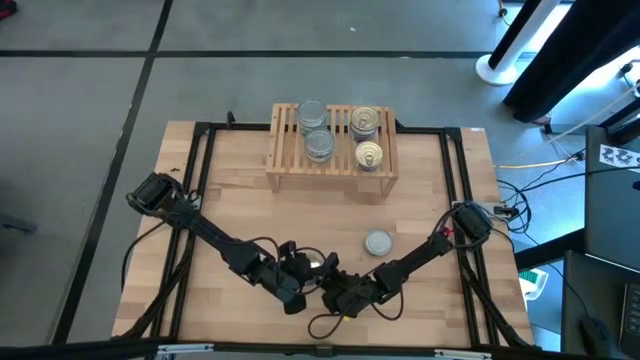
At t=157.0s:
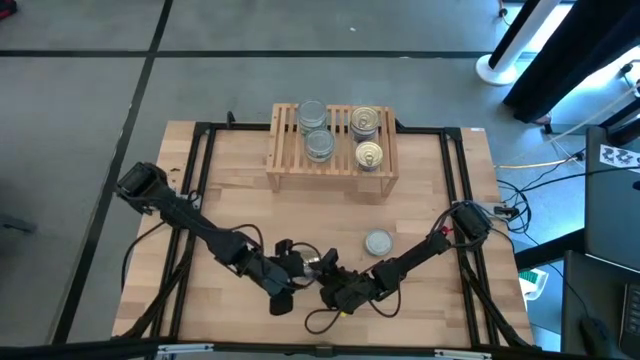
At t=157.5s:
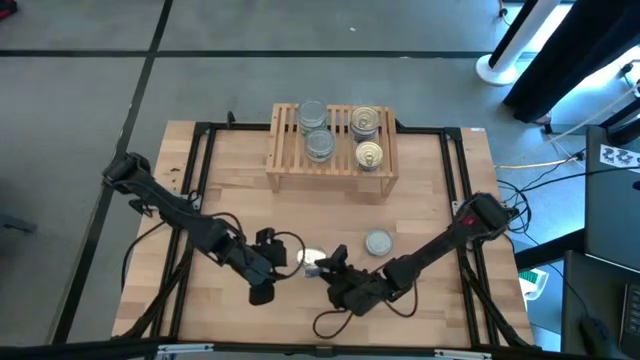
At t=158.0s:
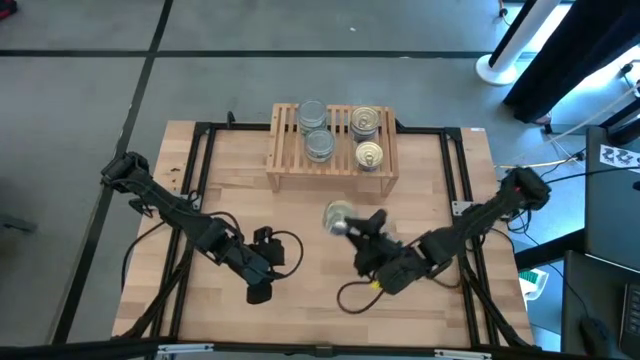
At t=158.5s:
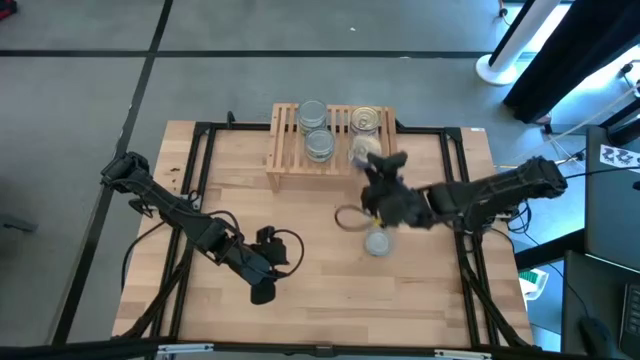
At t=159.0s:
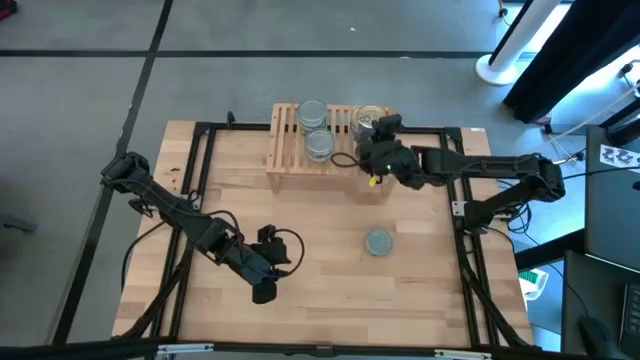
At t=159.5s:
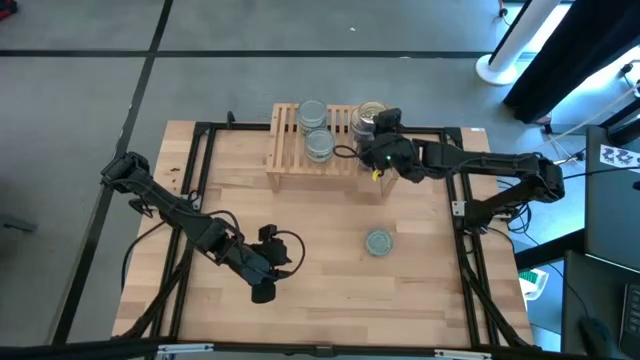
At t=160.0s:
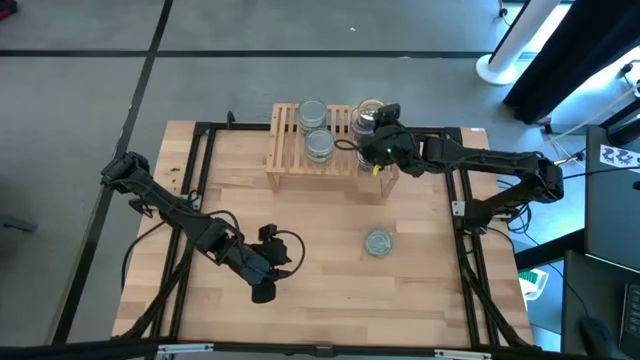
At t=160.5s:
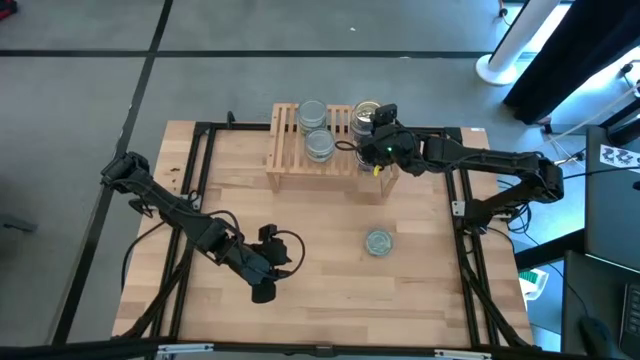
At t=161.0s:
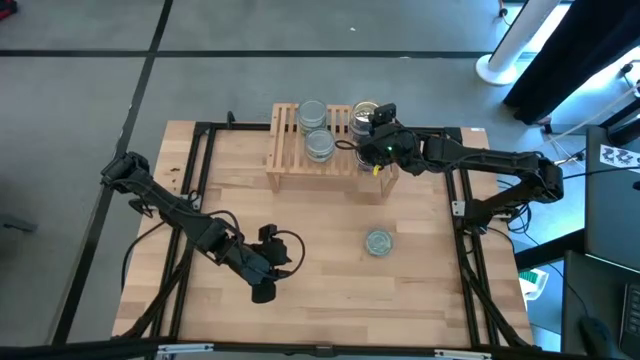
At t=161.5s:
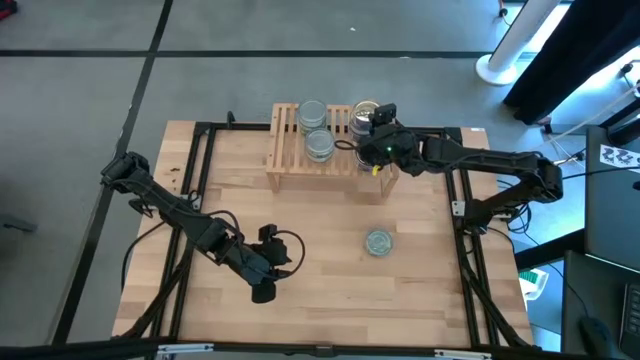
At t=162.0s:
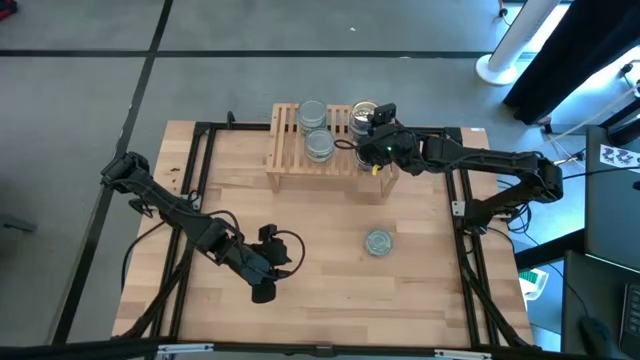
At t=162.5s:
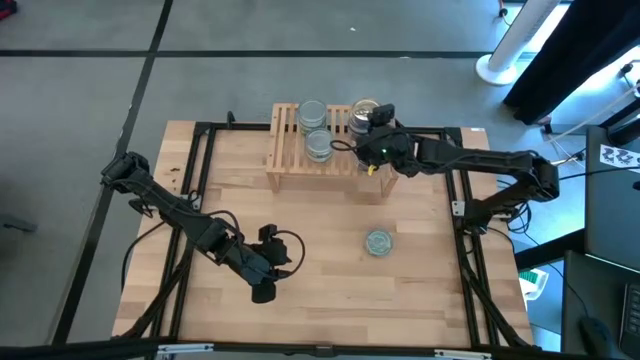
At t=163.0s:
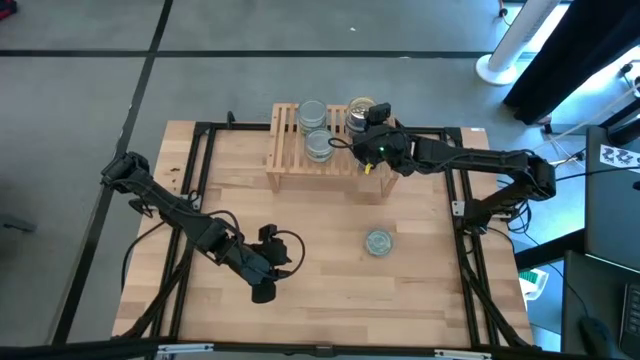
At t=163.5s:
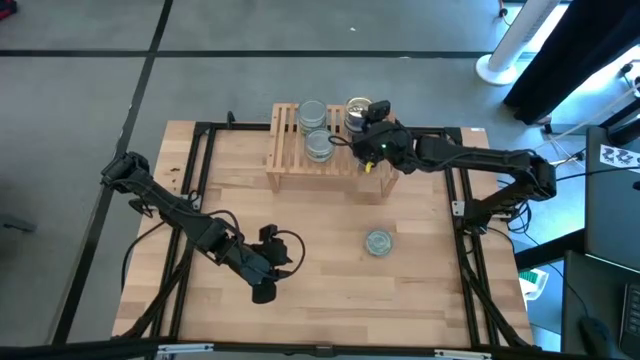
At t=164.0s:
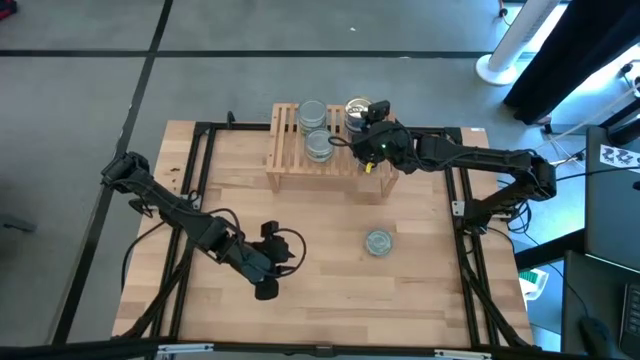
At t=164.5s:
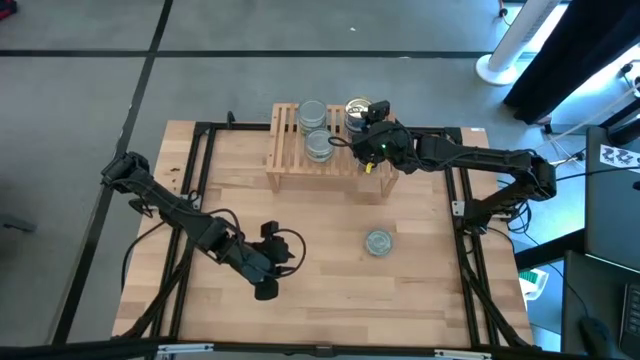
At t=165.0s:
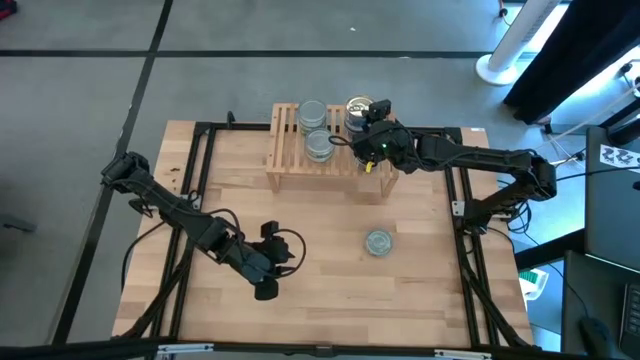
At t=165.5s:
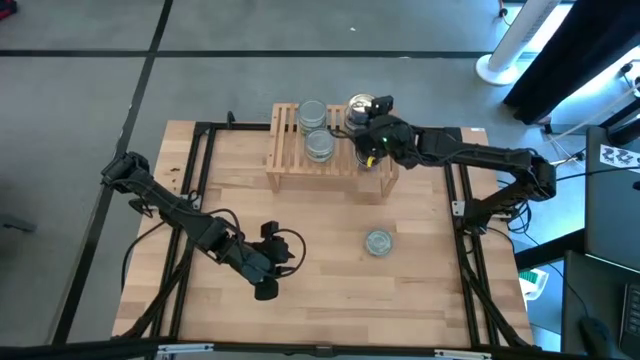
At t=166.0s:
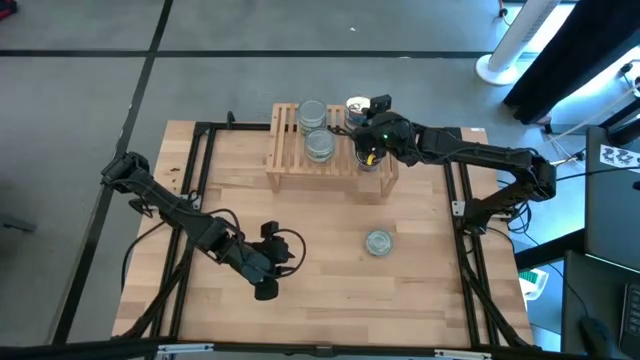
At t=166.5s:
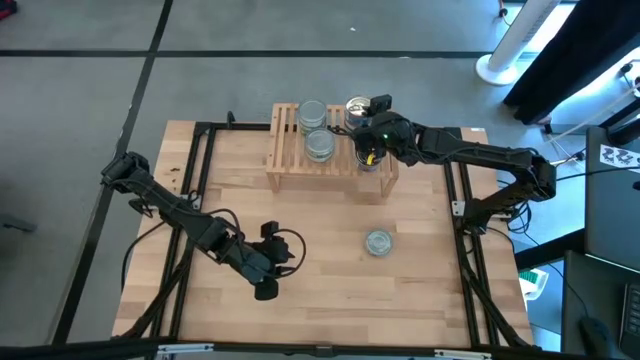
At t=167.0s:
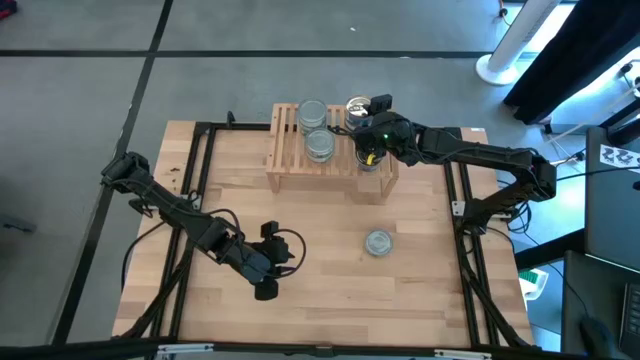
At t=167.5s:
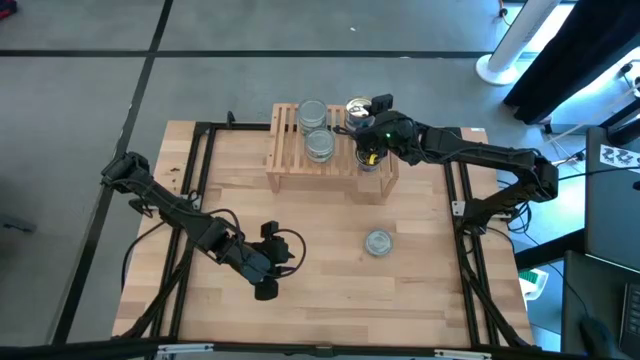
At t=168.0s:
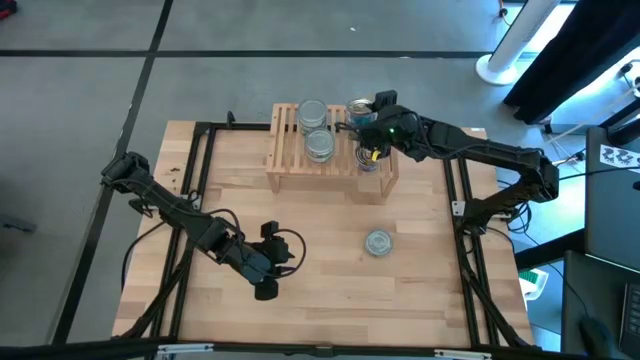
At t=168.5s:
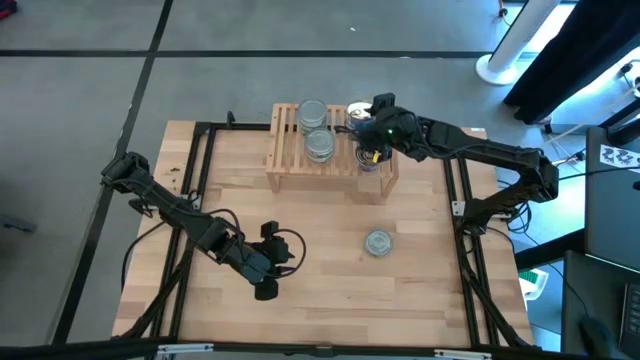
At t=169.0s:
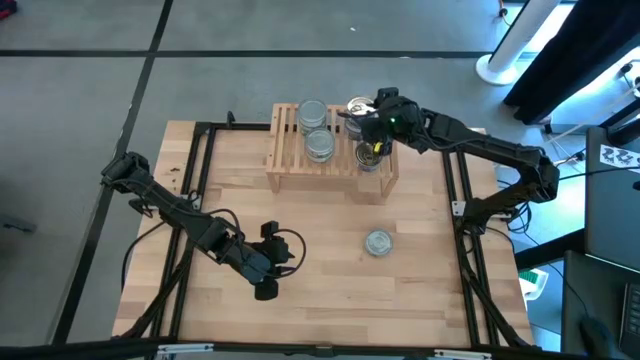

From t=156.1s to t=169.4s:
Task: Stack canned seafood by type on shelf
Stack the blue pink tuna can on top of the blue pink tuna can on the shelf

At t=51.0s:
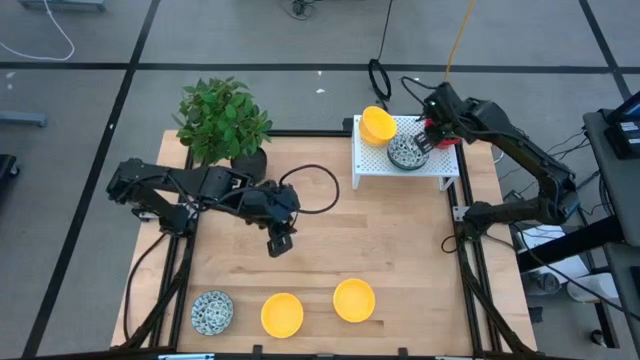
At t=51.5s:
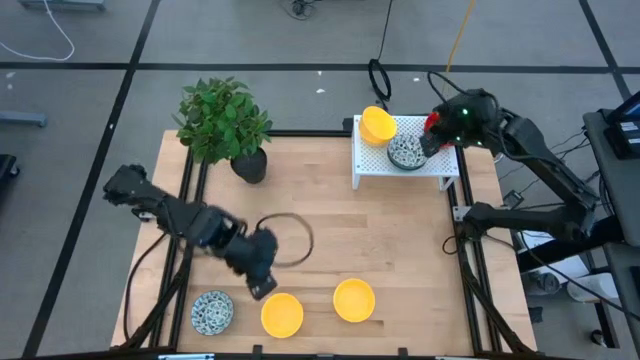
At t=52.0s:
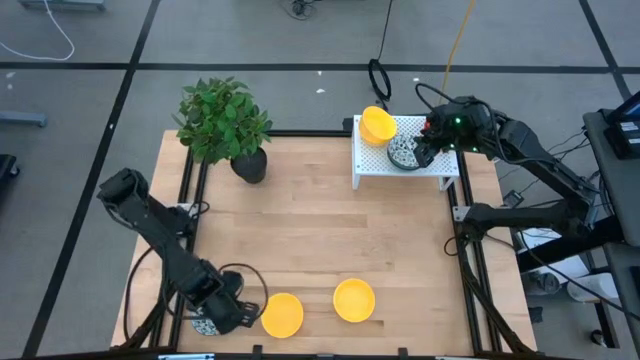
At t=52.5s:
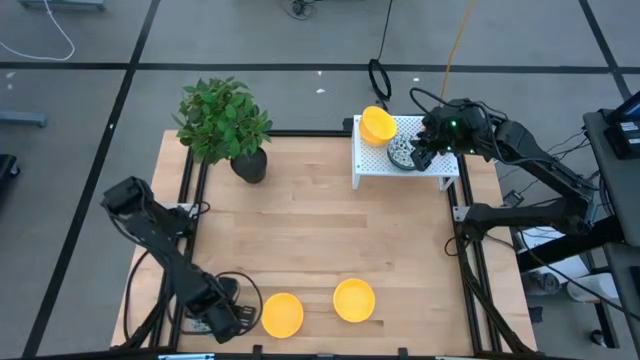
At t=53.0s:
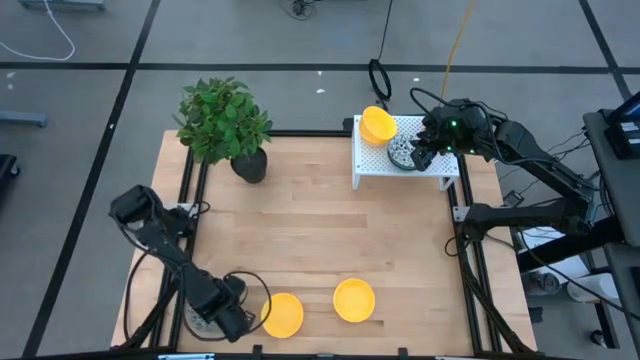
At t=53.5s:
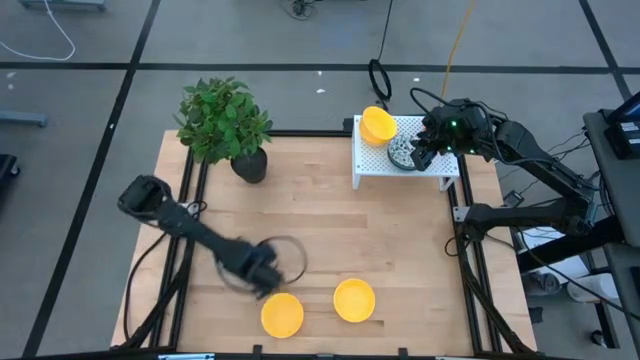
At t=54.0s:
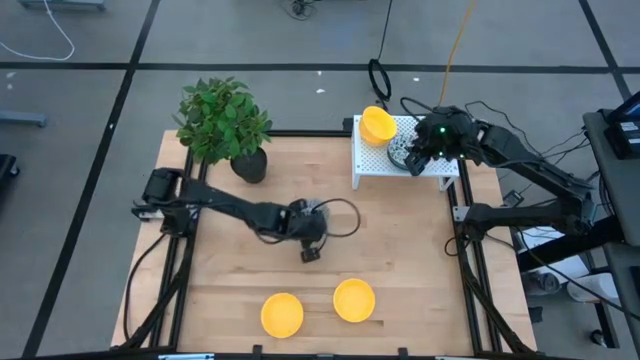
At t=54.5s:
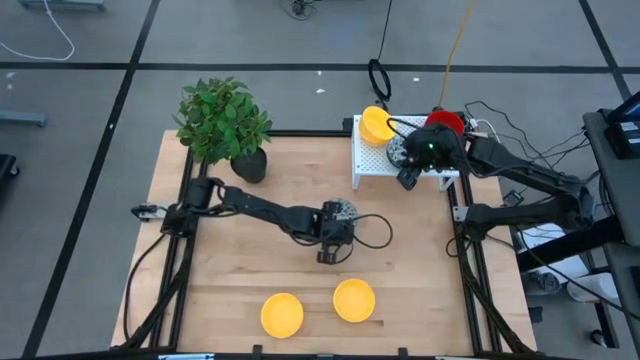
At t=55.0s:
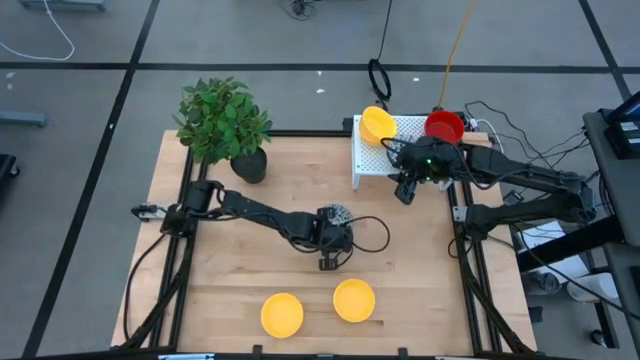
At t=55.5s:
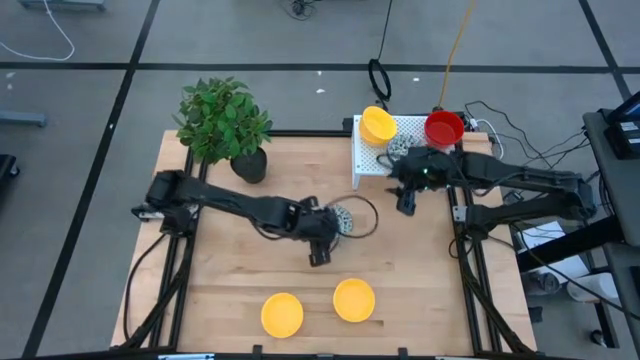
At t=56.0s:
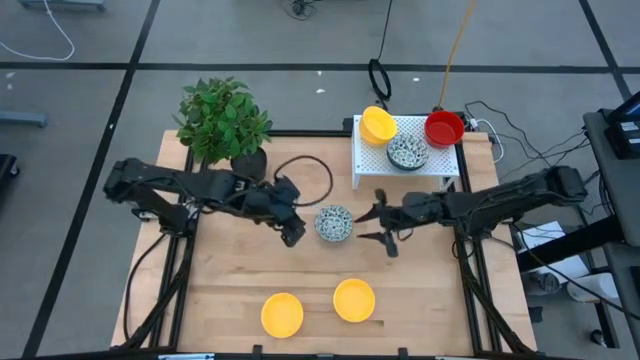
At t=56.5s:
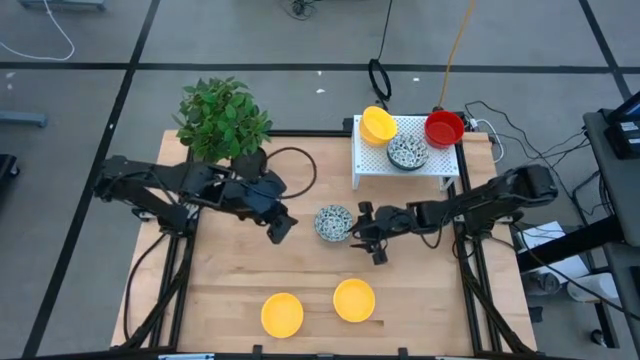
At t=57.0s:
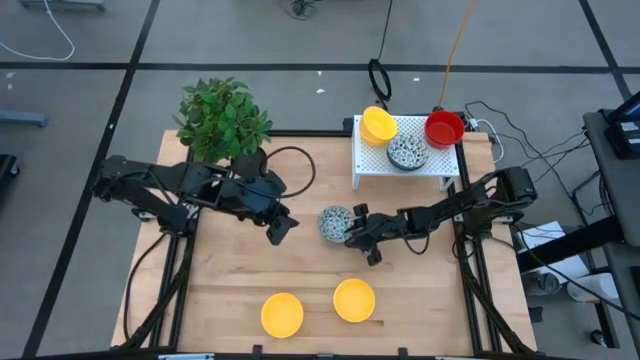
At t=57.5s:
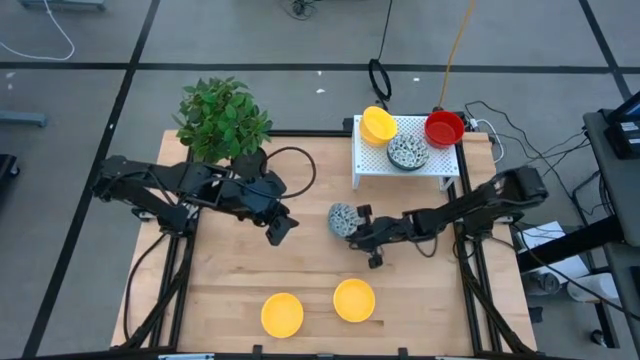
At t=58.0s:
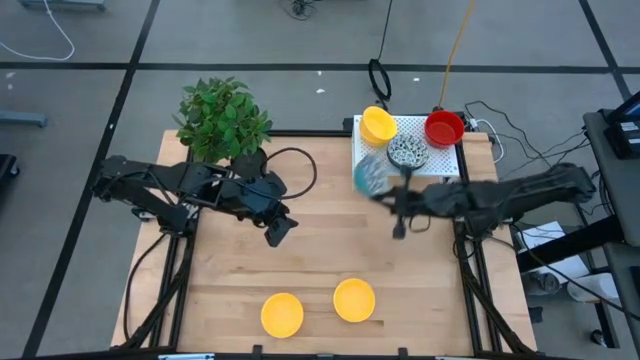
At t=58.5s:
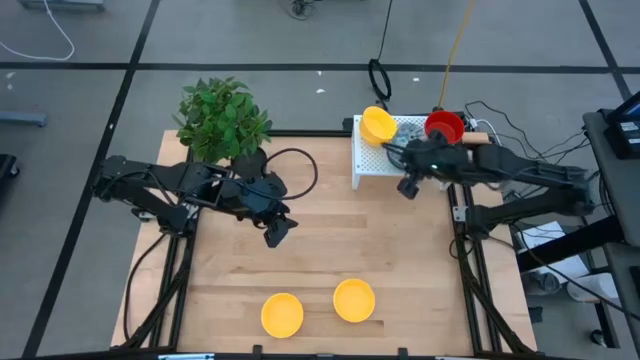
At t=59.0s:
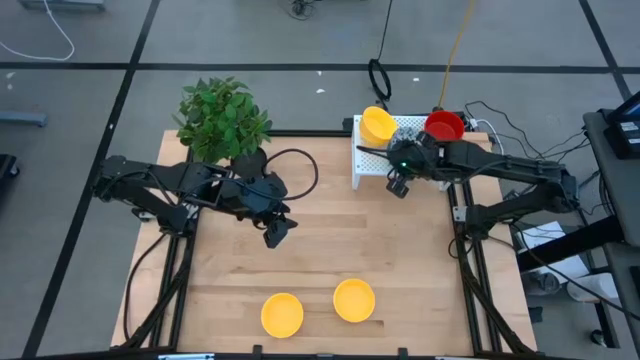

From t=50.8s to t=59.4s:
Task: Pick & Place Mini bowls
Stack the blue bowl on top of the blue bowls on the shelf
